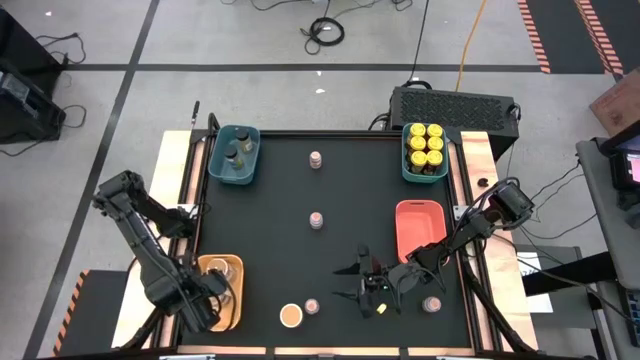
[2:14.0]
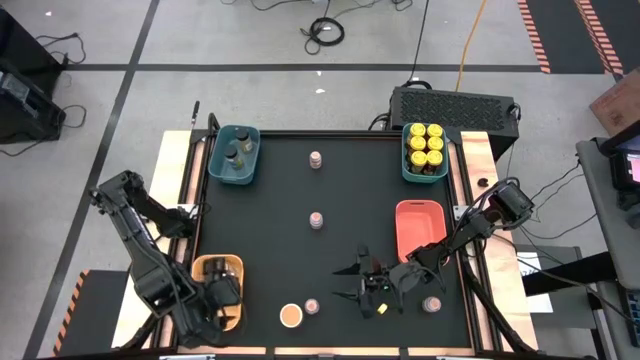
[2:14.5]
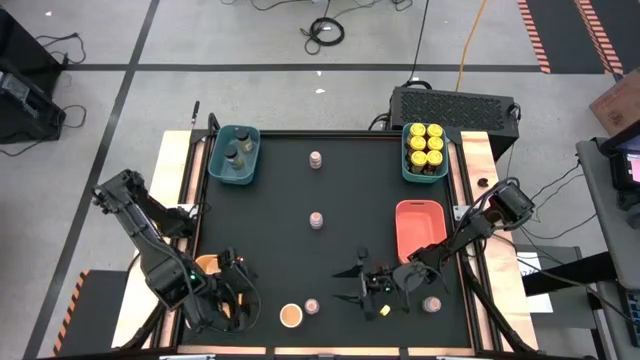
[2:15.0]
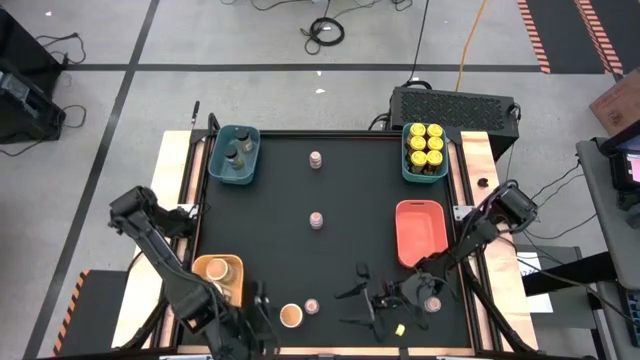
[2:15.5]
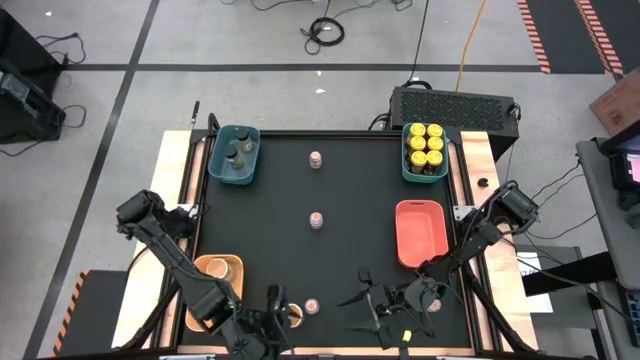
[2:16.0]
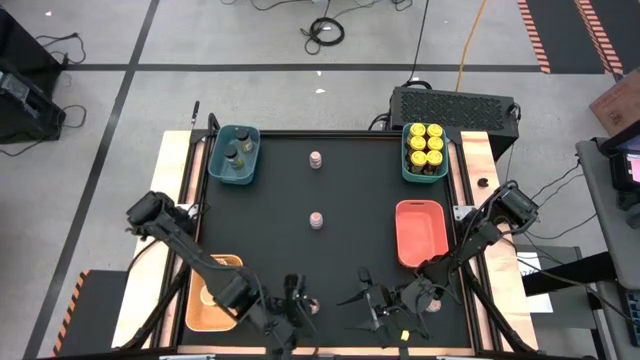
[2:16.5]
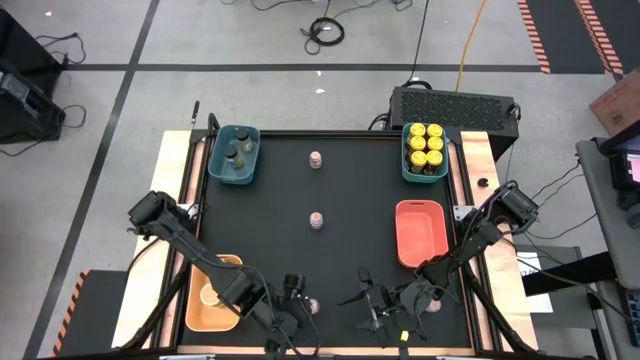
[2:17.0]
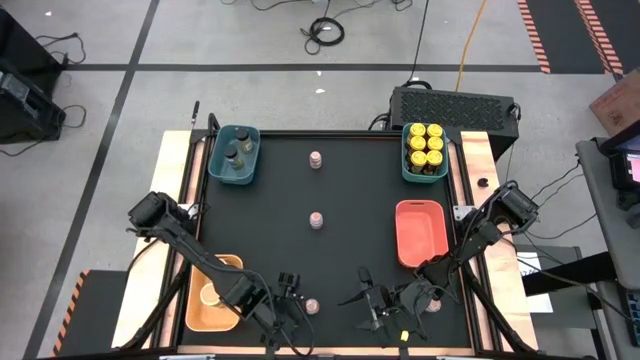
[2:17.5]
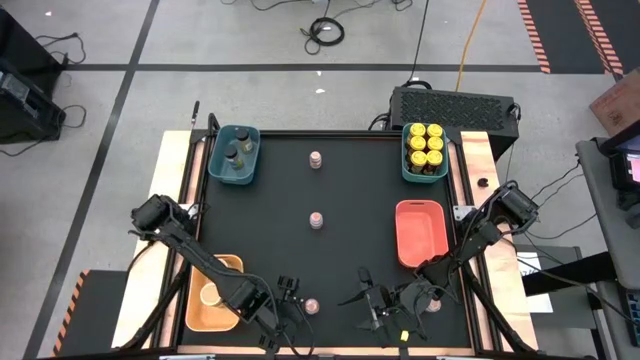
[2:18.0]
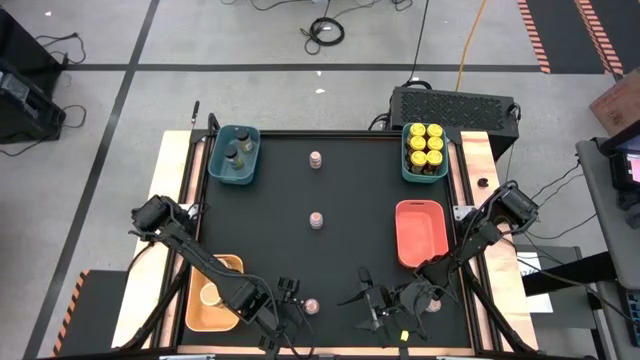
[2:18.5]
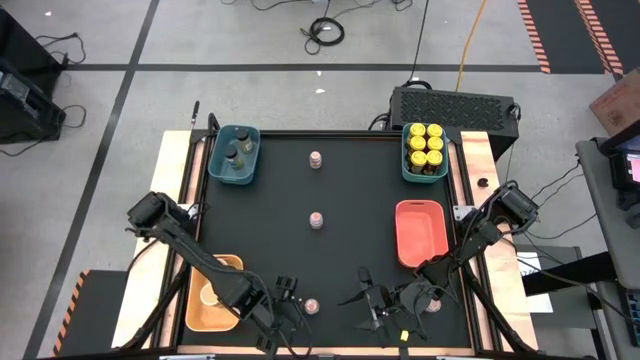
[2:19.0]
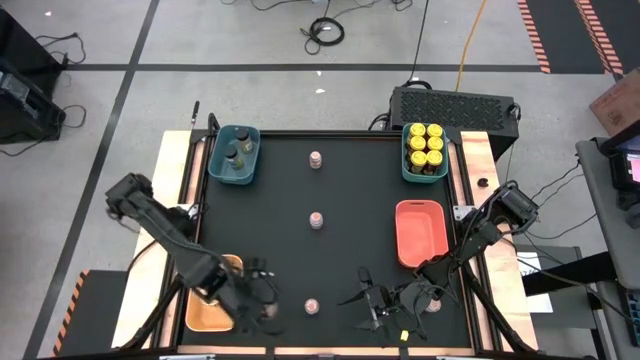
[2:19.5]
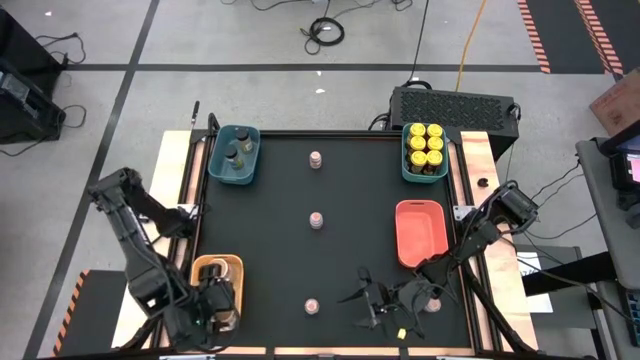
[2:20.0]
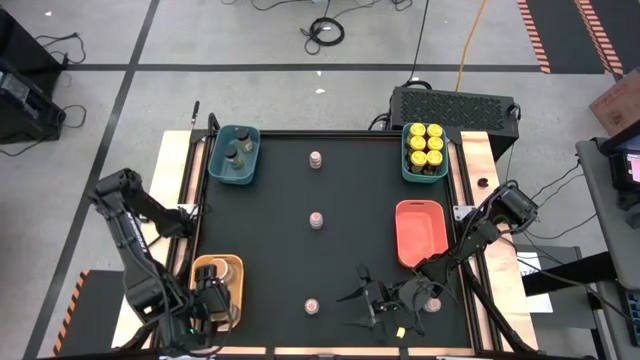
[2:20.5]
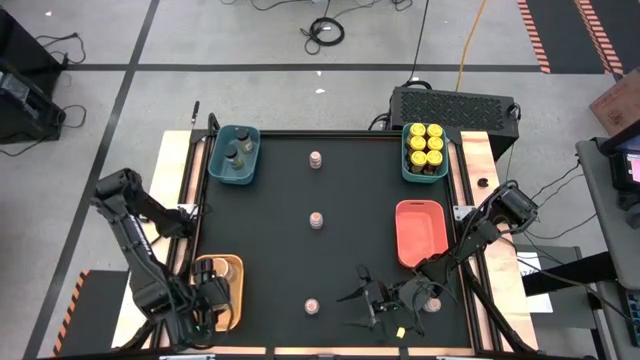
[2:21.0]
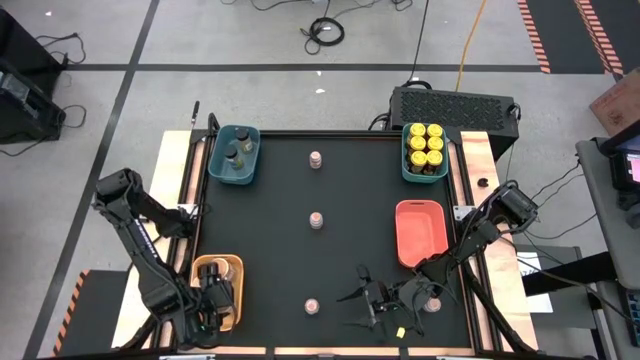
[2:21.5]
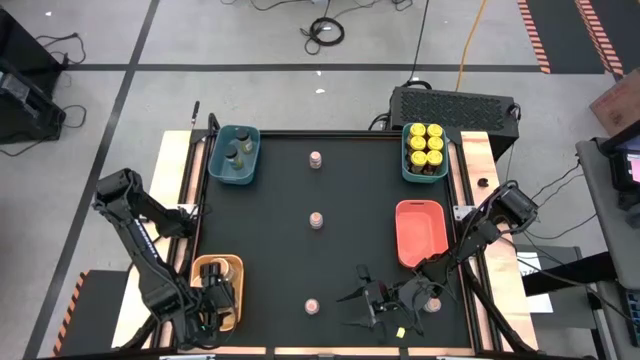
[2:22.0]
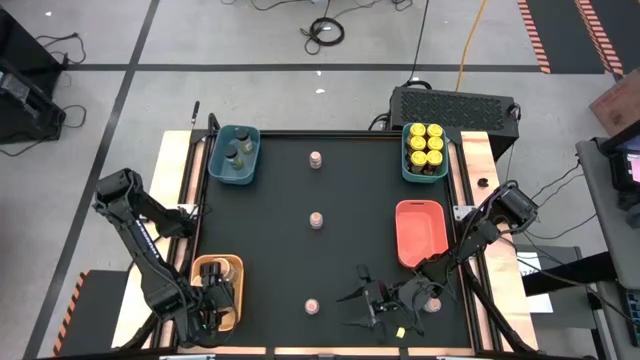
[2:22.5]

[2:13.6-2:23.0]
Task: Sort spices by type
Put the gold spice bottle into the yellow bin

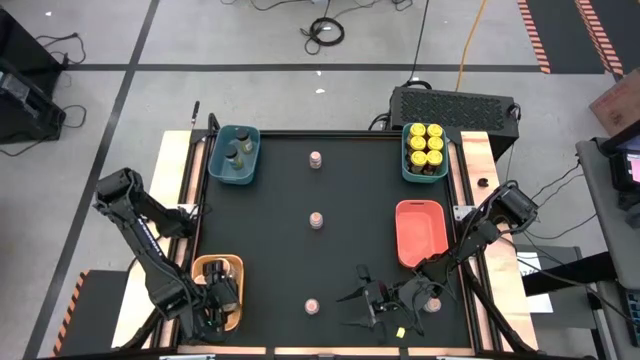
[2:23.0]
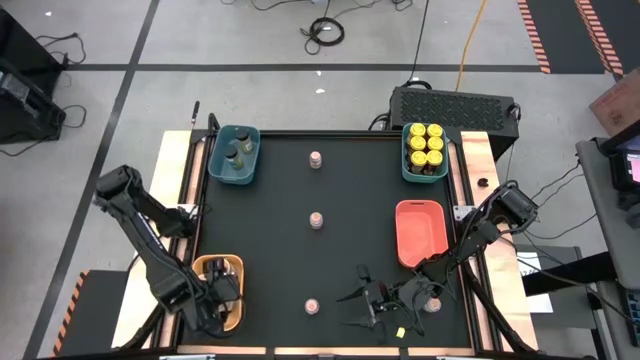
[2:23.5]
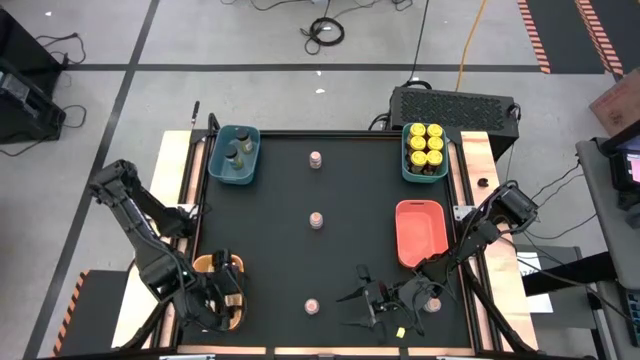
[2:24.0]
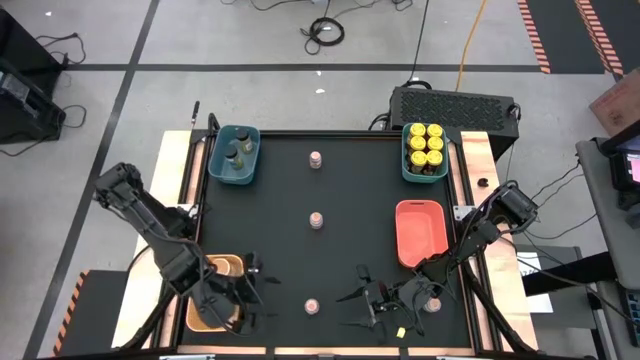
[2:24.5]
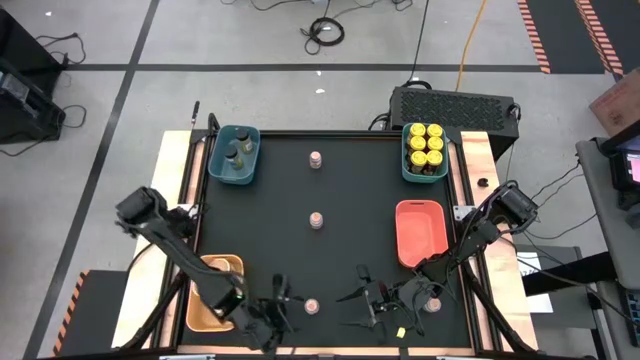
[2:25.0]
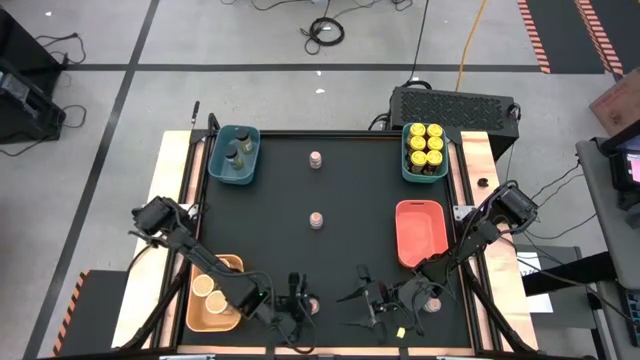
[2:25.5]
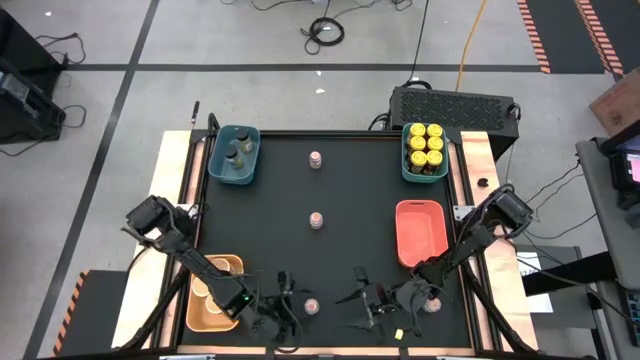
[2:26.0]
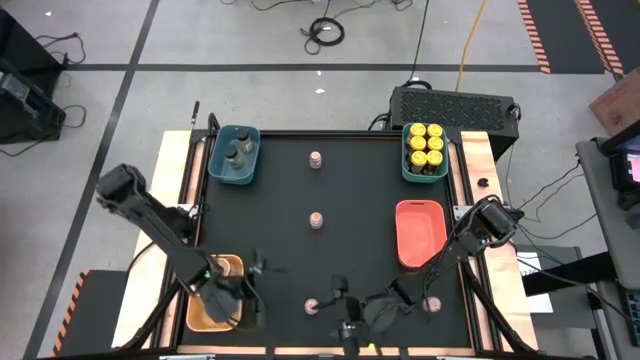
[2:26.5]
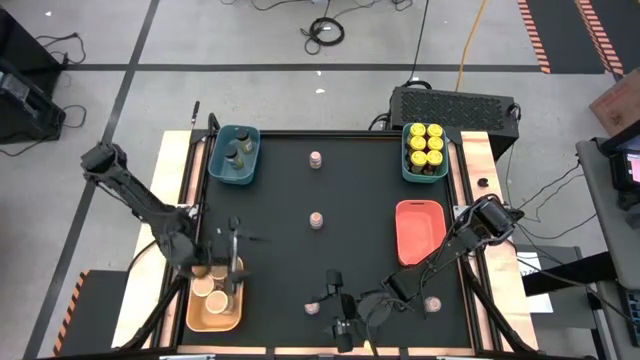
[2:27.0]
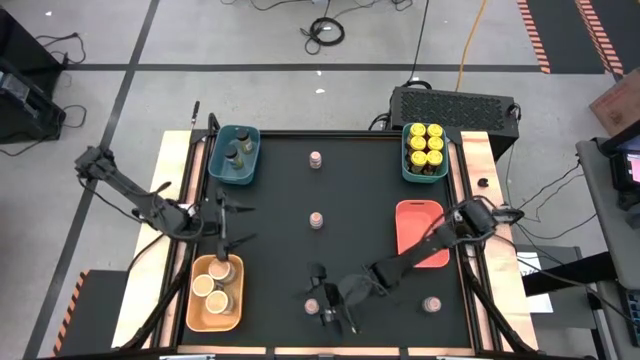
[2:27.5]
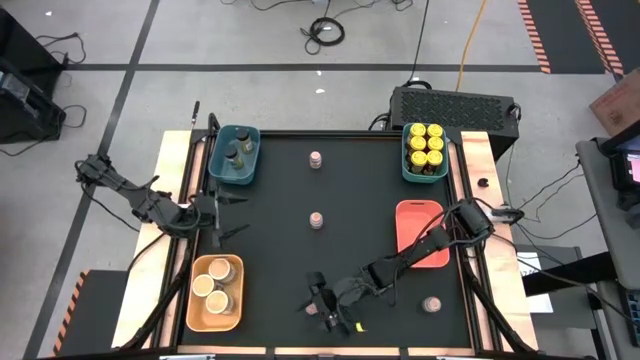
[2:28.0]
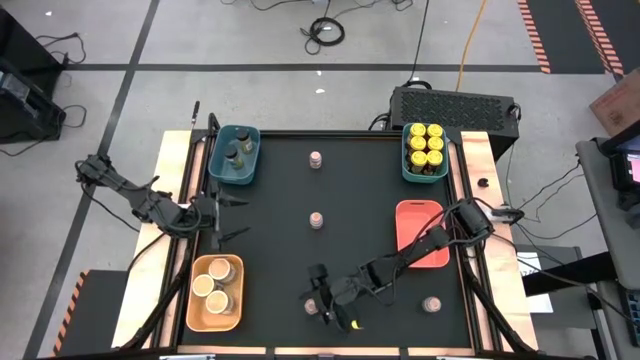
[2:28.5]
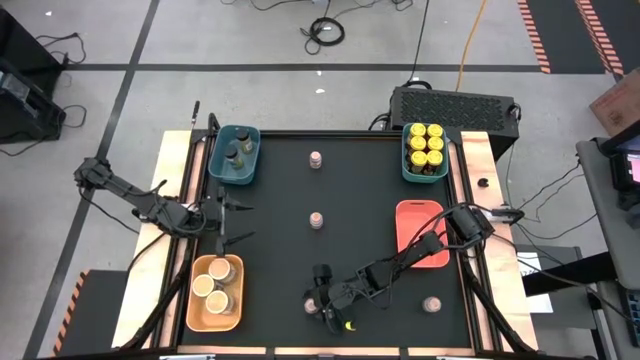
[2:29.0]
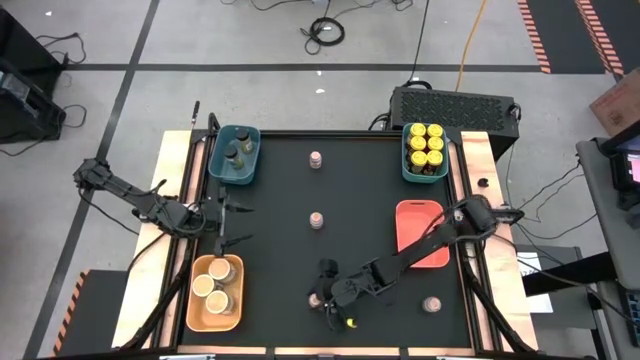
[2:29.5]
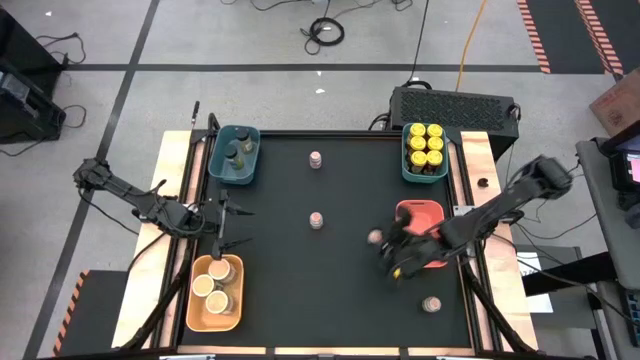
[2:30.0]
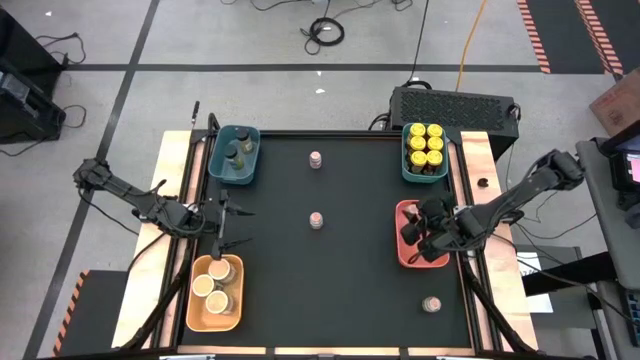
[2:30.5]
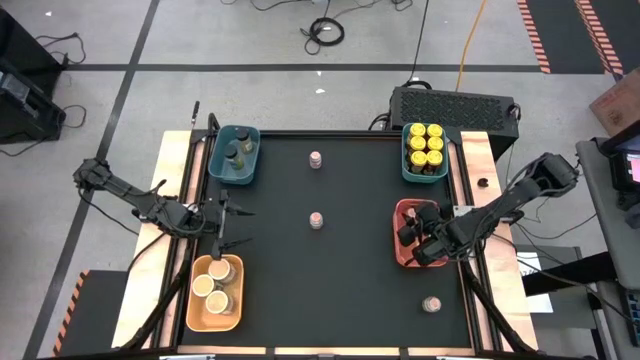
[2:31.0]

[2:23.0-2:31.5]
Put the brown spice bottle into the yellow bin

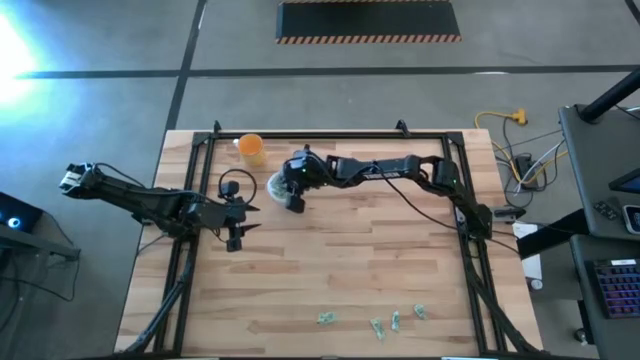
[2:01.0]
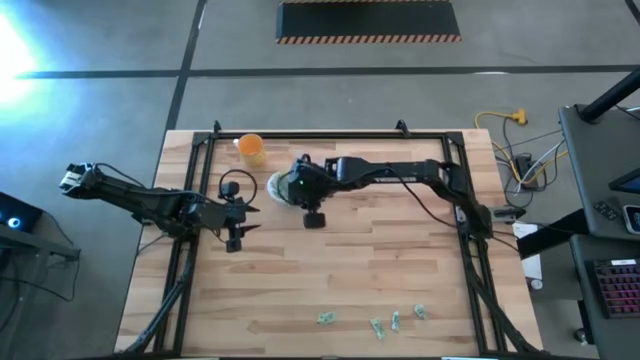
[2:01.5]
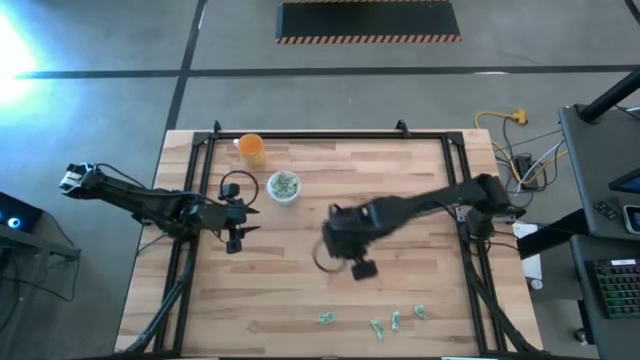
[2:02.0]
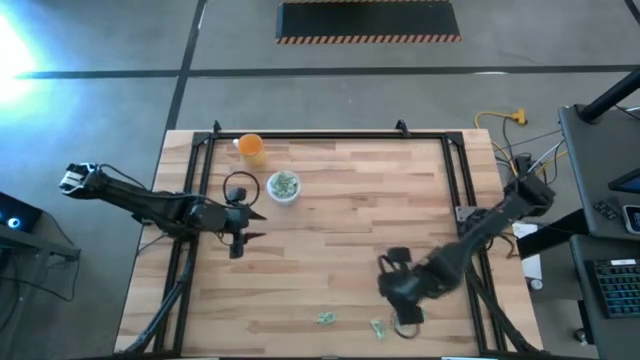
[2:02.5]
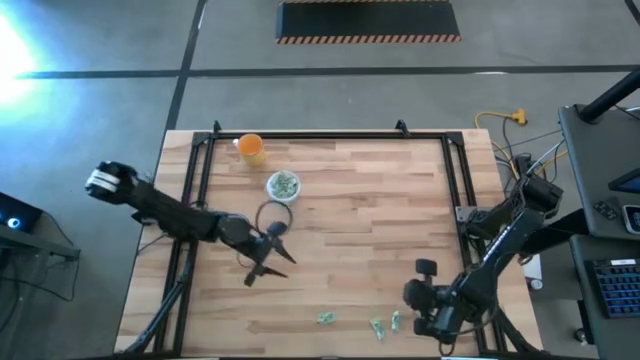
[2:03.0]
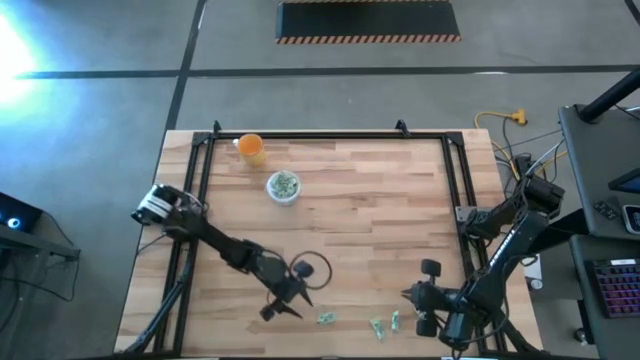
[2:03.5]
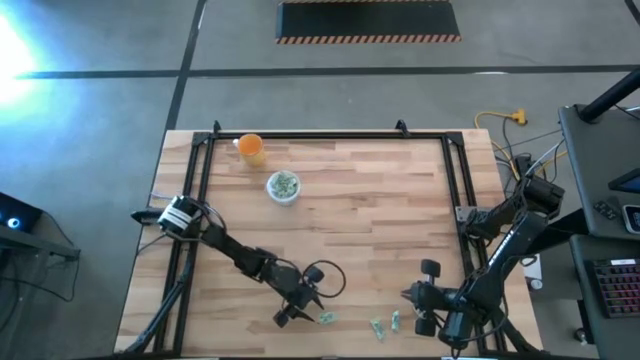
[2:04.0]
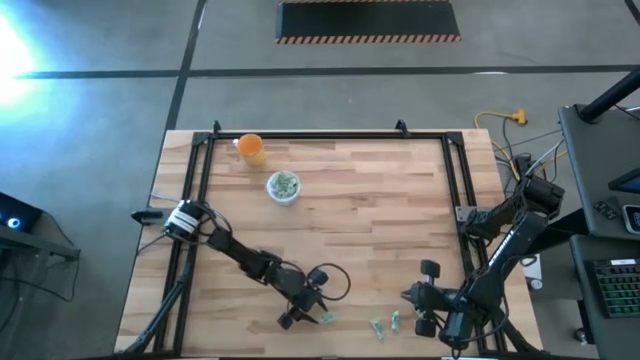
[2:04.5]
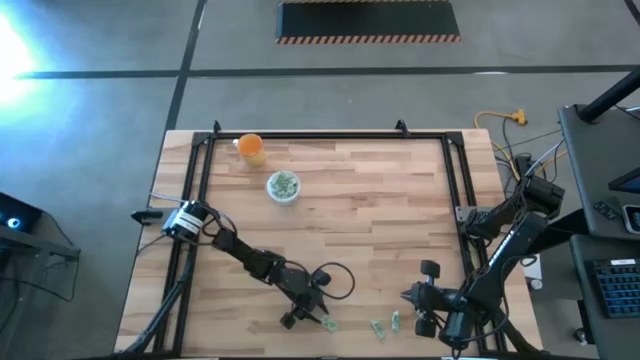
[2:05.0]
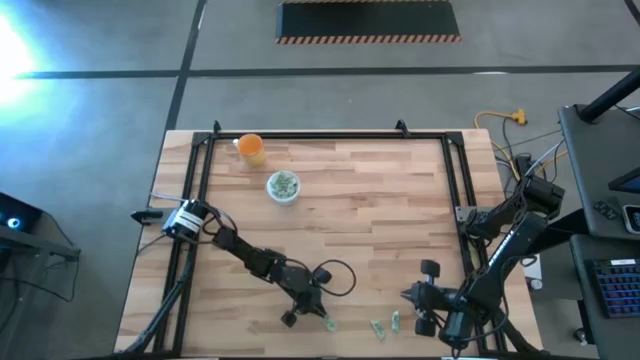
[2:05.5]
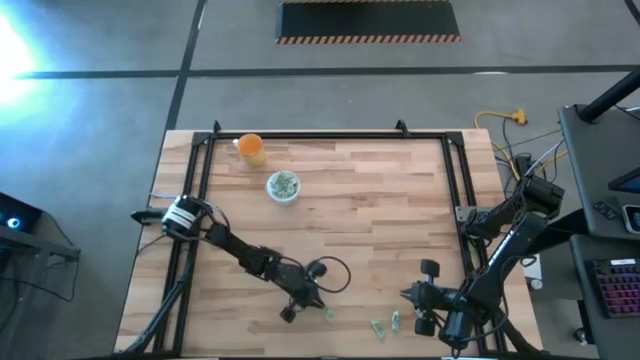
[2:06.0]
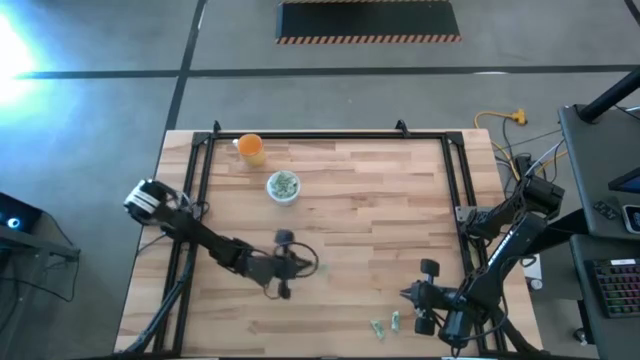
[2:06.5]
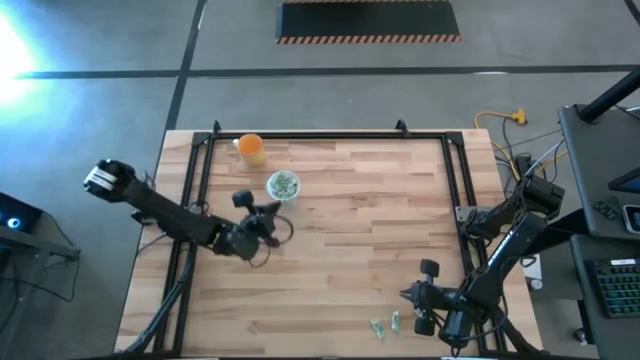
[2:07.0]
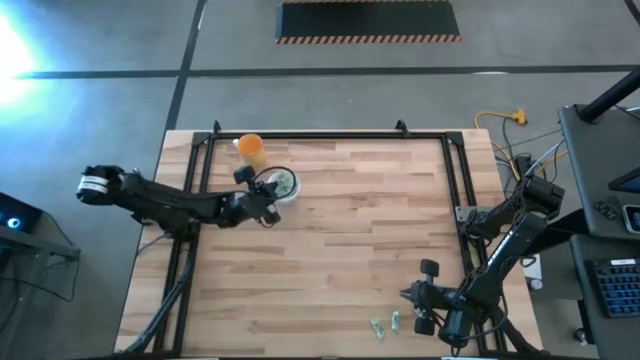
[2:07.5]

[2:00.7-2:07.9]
Task: Pick and place Stevia / Truvia into bins
Put the stevia packet into the transparent container
